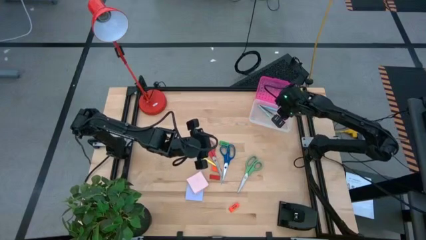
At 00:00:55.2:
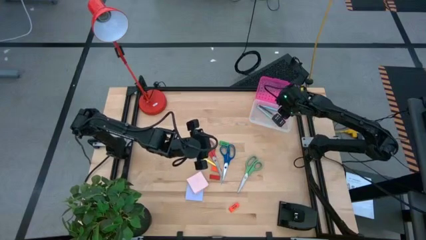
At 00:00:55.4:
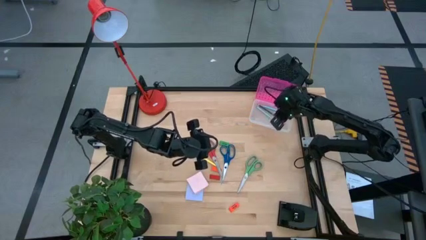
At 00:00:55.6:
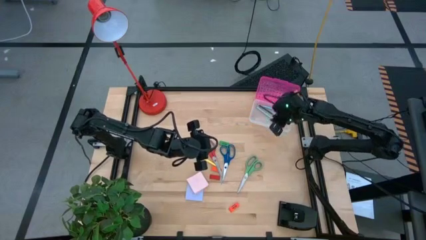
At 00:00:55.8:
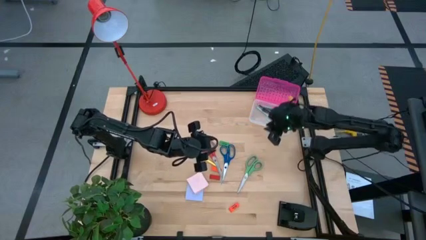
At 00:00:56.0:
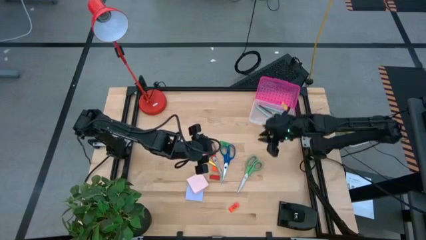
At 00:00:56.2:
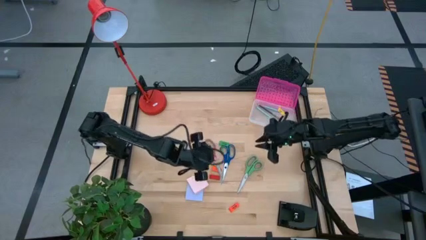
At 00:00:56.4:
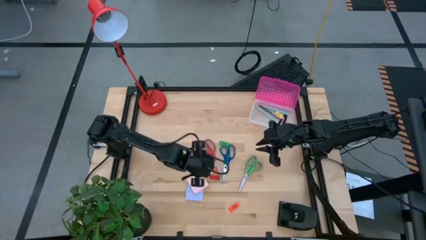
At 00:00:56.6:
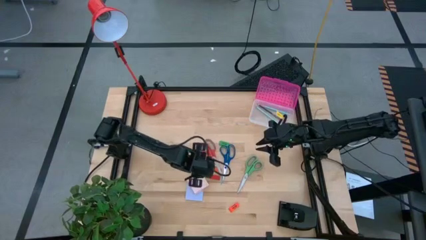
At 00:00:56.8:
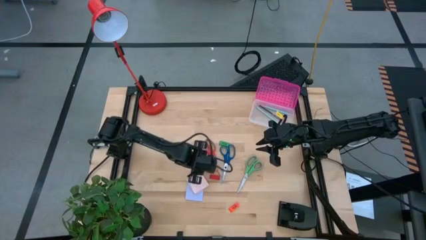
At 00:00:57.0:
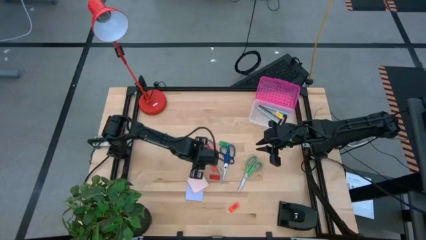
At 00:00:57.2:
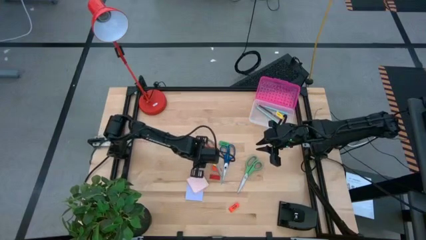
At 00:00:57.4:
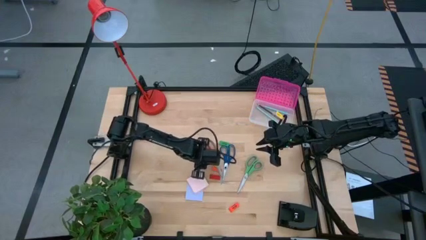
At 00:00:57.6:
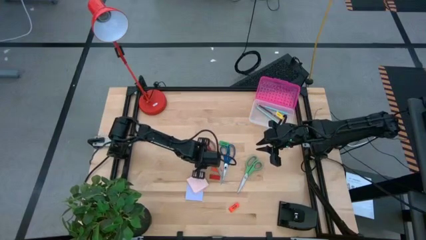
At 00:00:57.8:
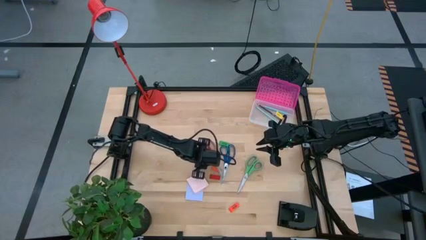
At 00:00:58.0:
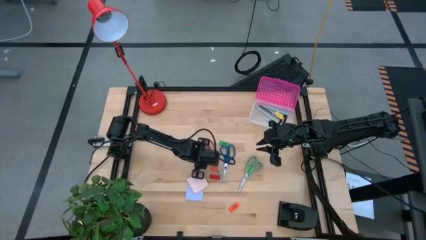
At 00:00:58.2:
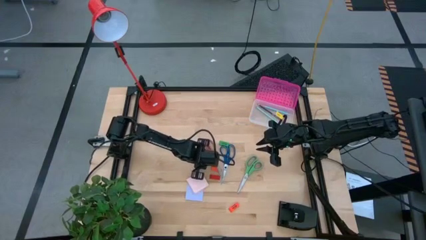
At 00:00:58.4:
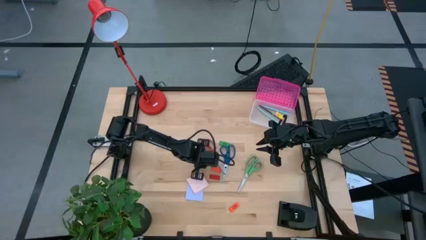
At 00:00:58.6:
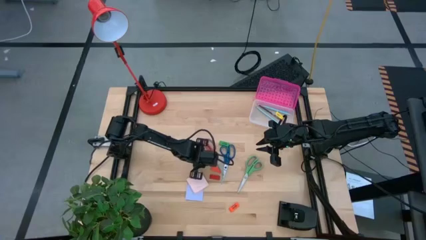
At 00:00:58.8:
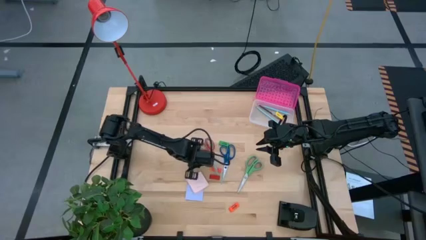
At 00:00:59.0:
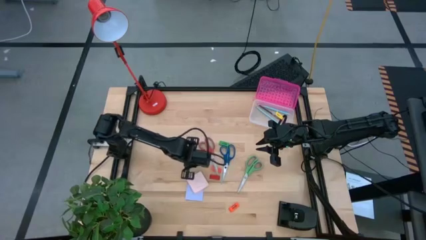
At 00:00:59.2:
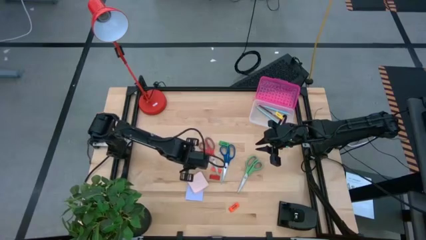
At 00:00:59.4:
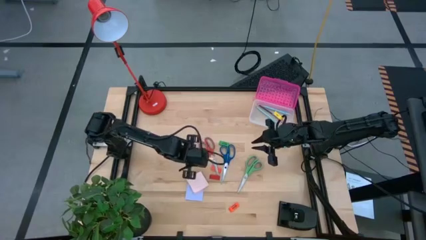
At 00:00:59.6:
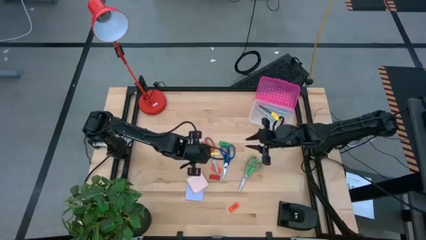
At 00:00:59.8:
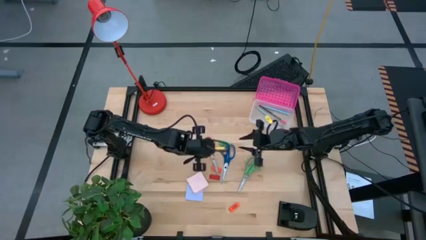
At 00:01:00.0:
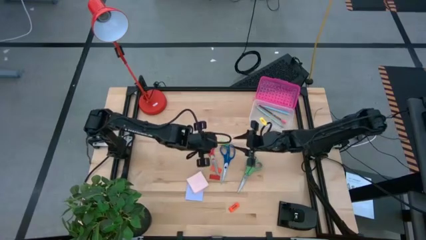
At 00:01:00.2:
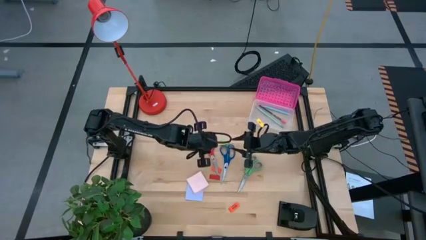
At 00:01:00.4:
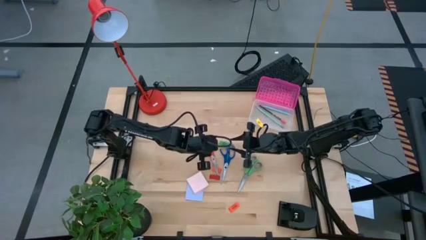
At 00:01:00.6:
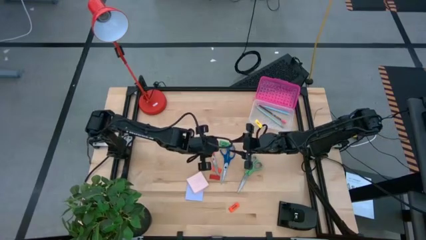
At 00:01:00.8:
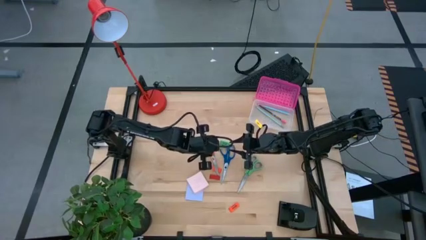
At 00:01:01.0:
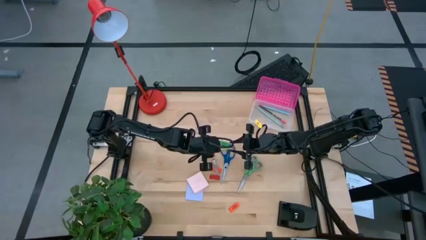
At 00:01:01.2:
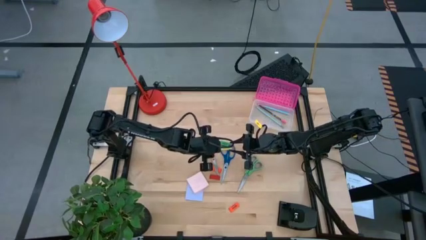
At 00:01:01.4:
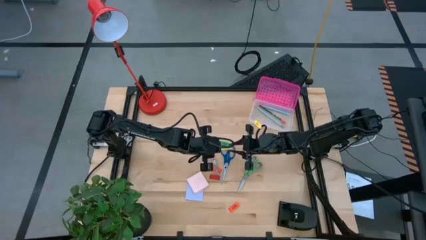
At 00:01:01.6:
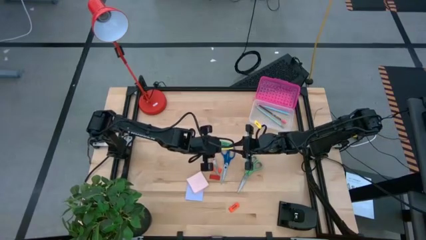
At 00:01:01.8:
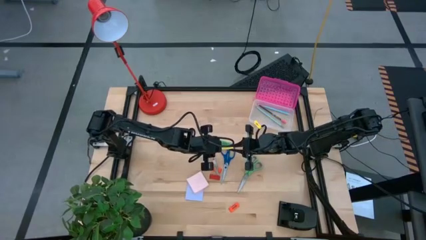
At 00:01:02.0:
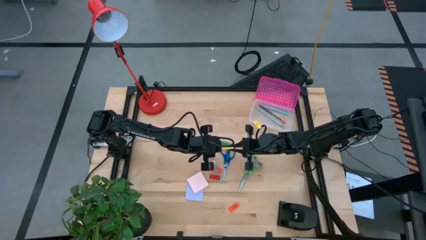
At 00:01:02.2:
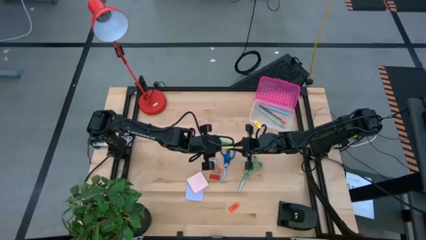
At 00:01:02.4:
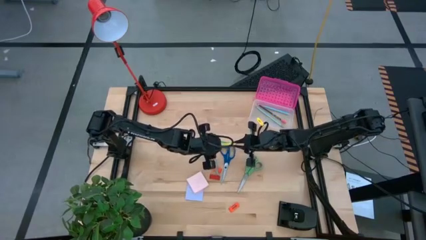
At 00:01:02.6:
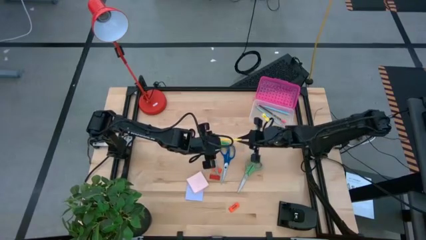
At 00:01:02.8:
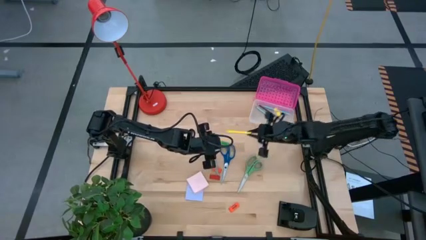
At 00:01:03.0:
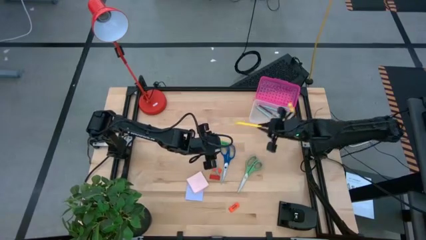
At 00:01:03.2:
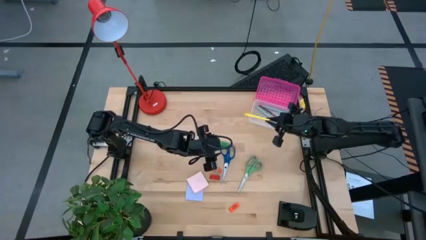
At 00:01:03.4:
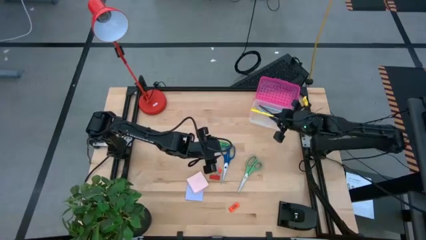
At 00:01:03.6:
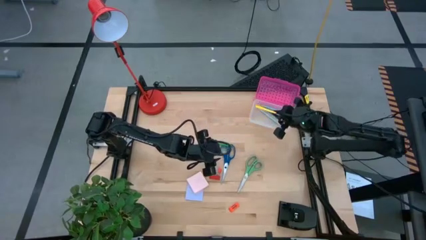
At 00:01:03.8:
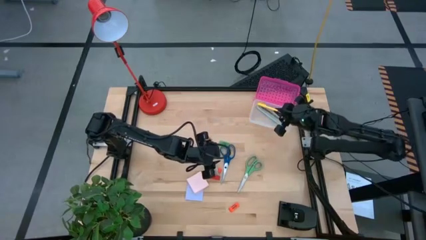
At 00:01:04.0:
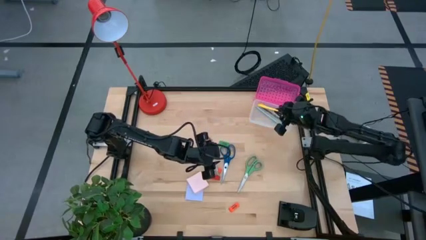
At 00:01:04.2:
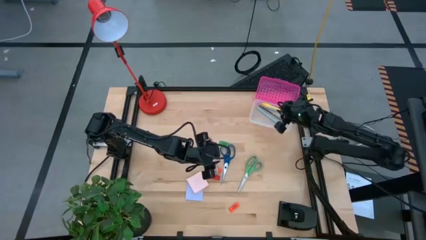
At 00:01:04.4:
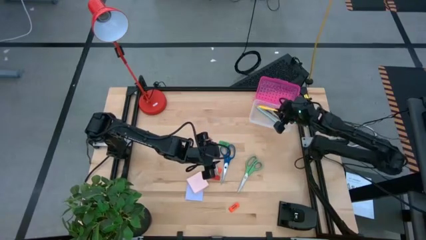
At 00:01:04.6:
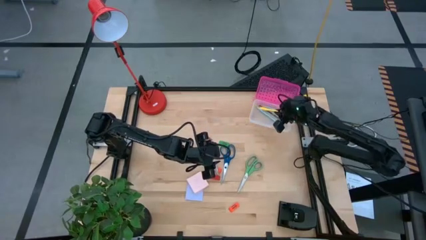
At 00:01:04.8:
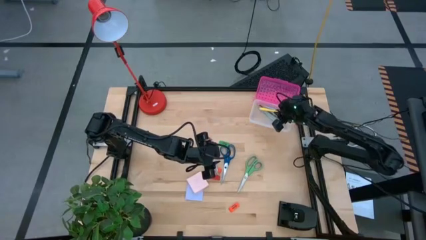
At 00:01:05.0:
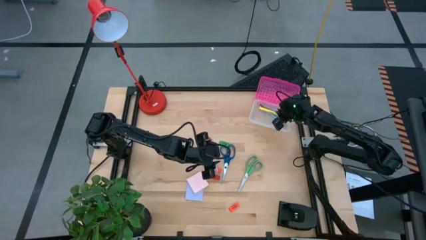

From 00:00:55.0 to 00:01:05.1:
Task: Pack school essentials
Put the yellow pen into the supply box

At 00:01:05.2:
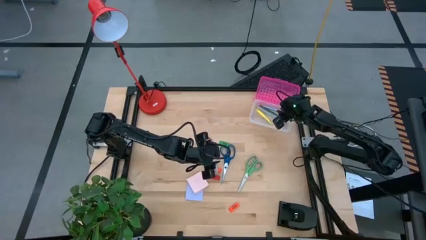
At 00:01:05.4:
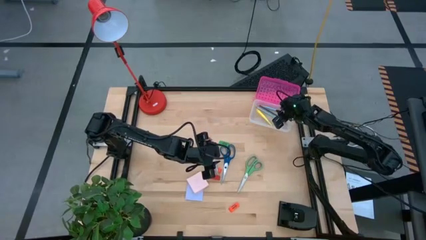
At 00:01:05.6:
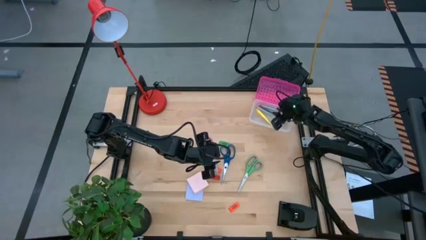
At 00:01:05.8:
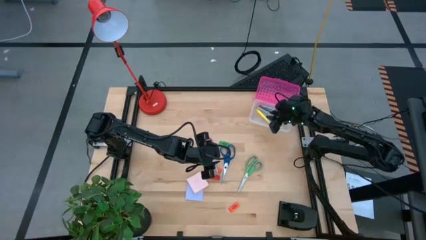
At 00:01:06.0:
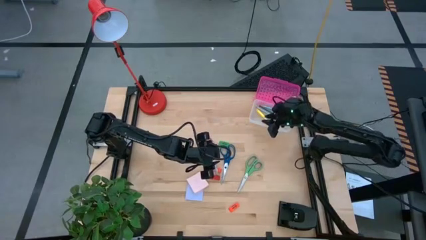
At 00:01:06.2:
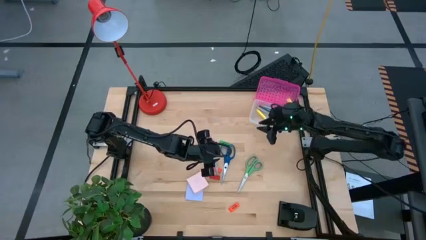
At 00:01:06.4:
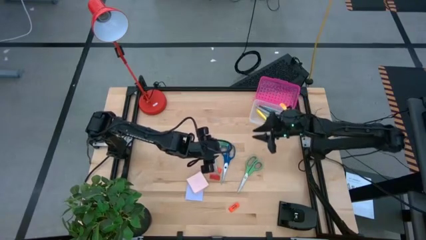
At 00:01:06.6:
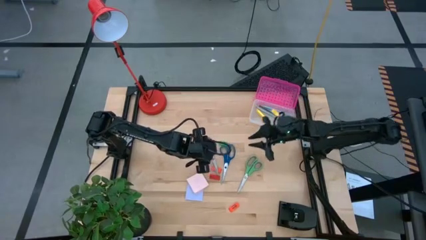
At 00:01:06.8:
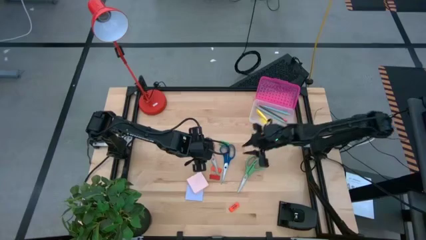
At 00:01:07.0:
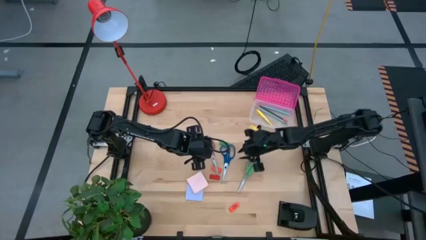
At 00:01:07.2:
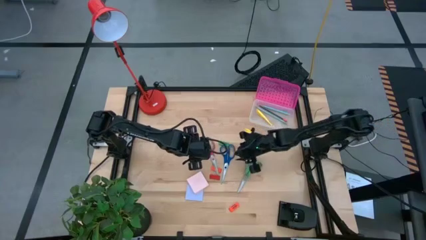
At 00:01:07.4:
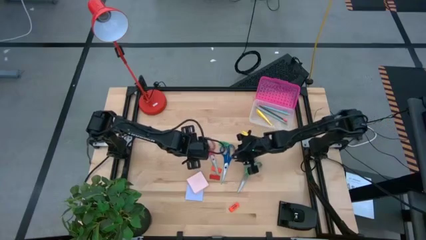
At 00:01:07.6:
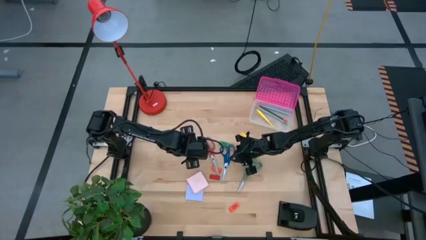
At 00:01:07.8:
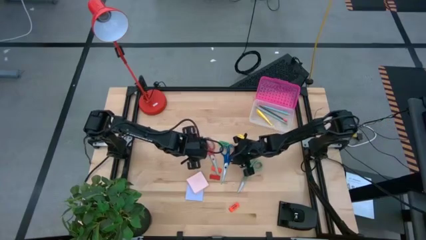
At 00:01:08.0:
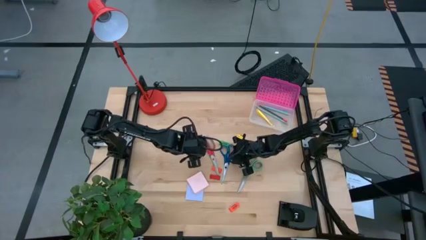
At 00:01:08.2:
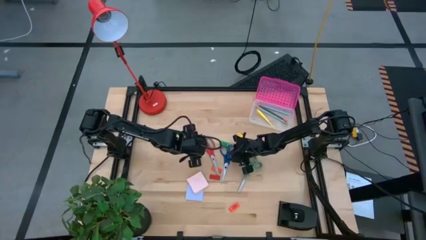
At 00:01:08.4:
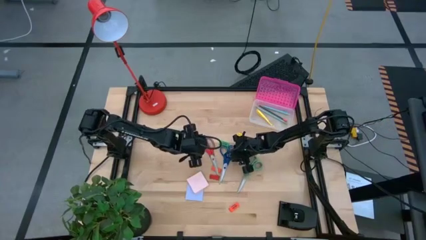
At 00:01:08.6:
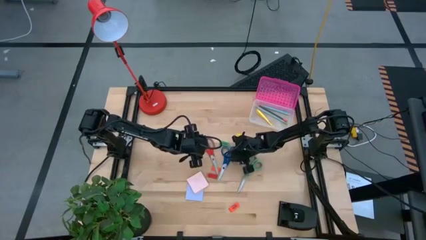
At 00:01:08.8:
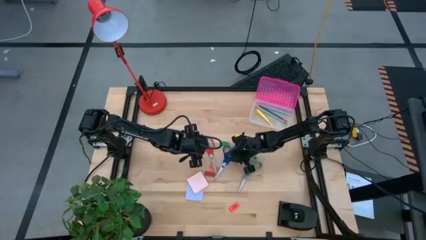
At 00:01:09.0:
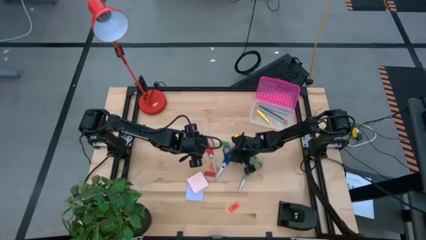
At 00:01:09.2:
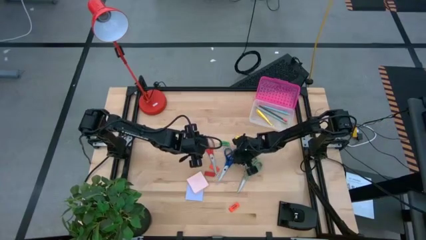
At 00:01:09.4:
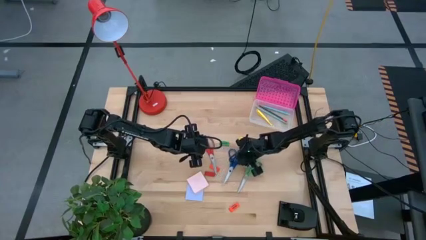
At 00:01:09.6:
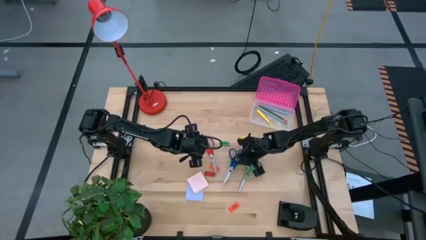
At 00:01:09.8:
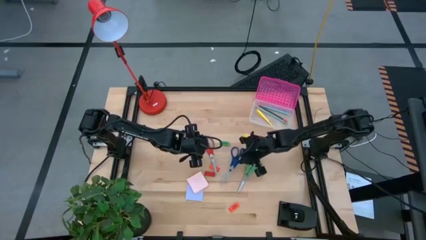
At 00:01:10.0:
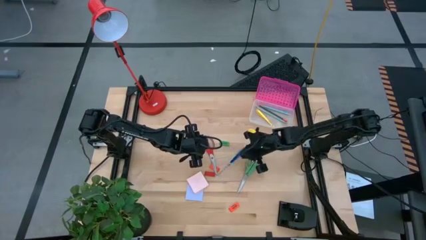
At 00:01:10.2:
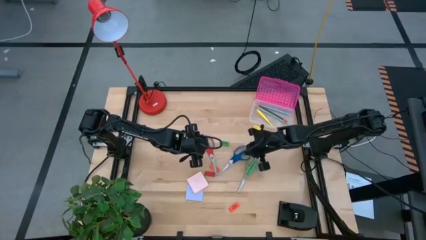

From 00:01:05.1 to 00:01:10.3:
Put the blue scissors into the supply box
